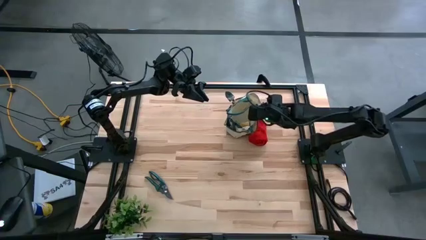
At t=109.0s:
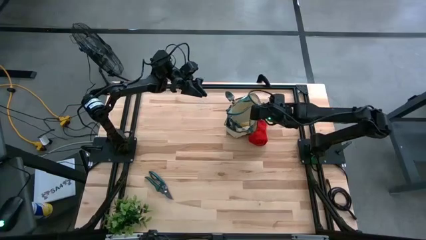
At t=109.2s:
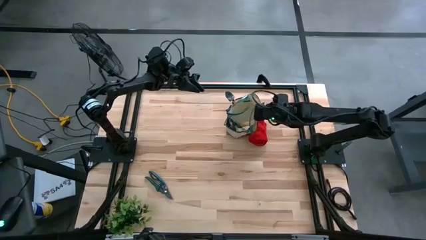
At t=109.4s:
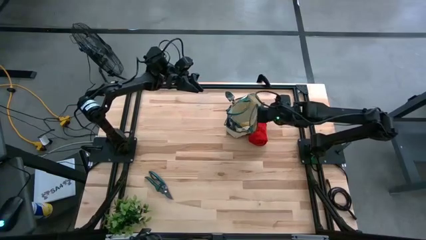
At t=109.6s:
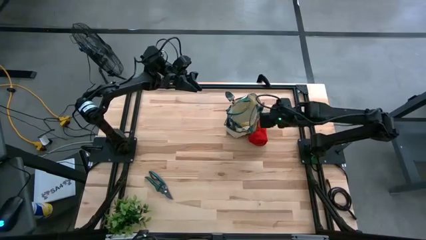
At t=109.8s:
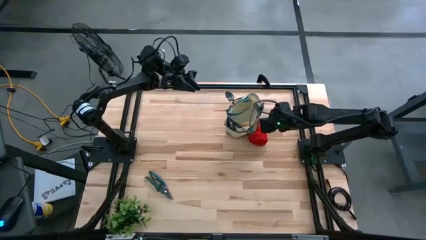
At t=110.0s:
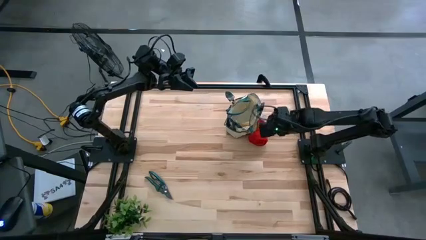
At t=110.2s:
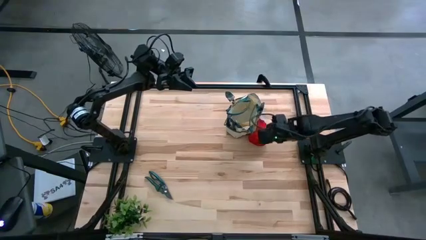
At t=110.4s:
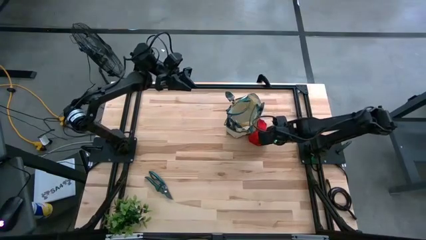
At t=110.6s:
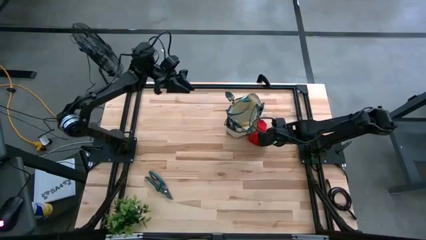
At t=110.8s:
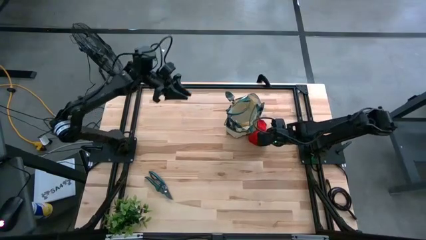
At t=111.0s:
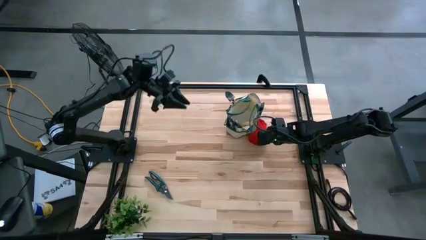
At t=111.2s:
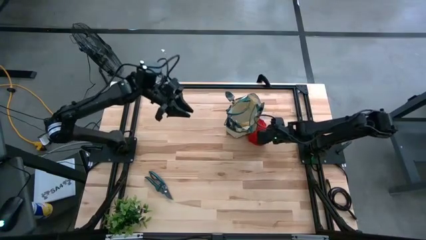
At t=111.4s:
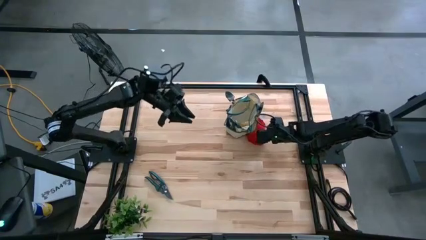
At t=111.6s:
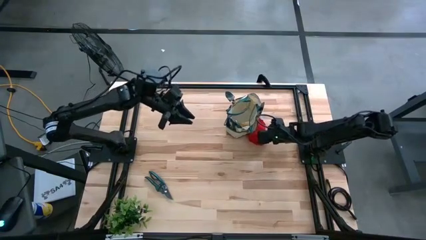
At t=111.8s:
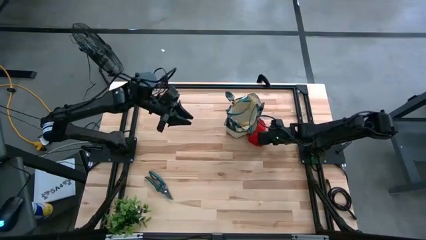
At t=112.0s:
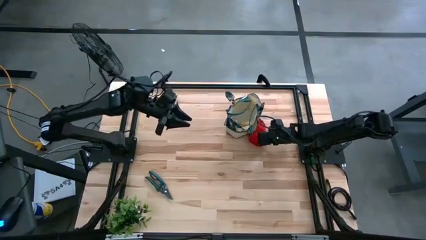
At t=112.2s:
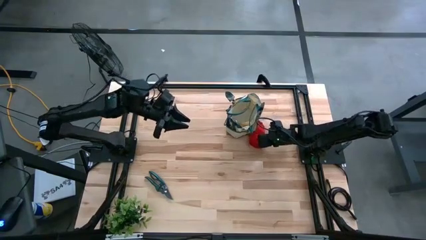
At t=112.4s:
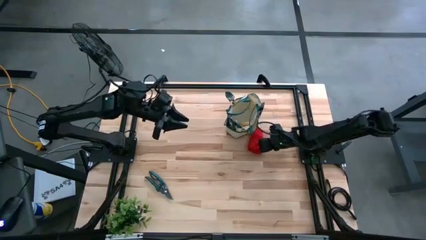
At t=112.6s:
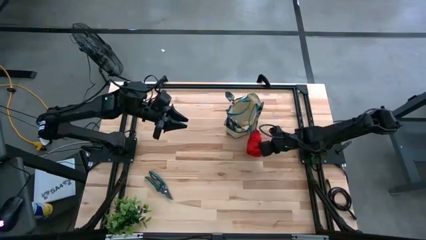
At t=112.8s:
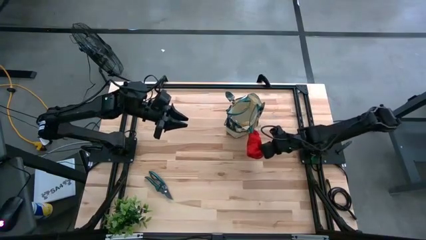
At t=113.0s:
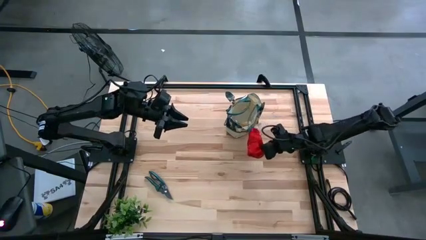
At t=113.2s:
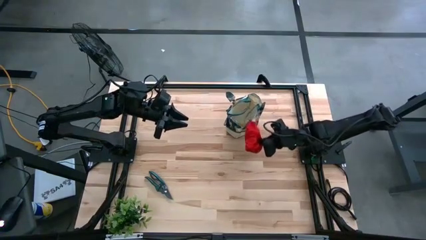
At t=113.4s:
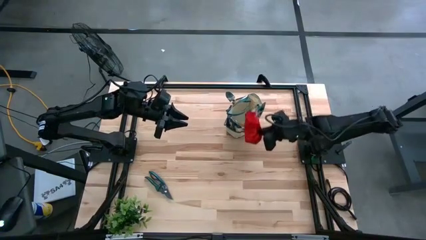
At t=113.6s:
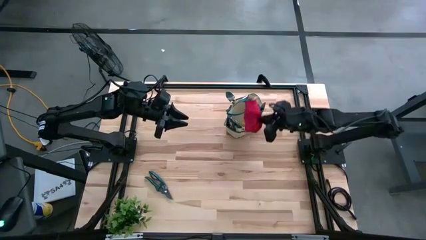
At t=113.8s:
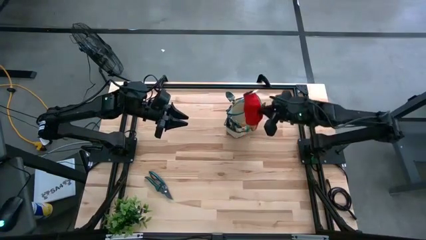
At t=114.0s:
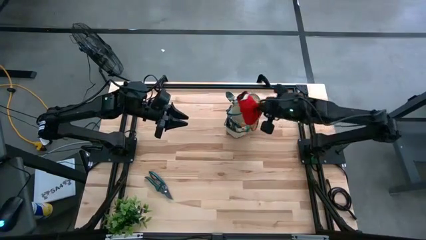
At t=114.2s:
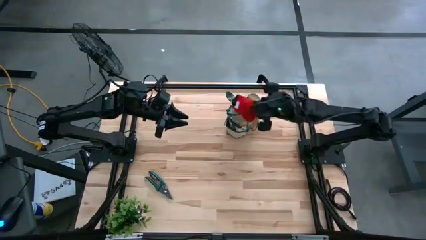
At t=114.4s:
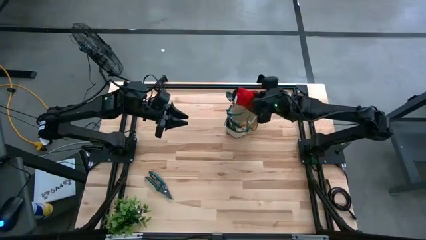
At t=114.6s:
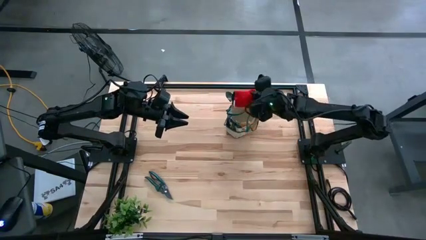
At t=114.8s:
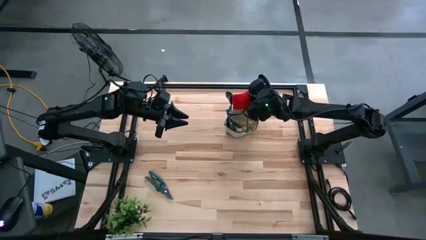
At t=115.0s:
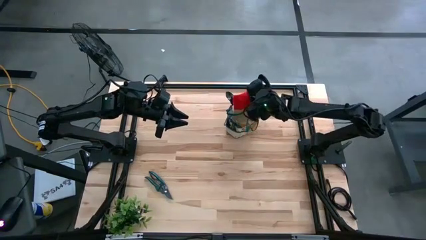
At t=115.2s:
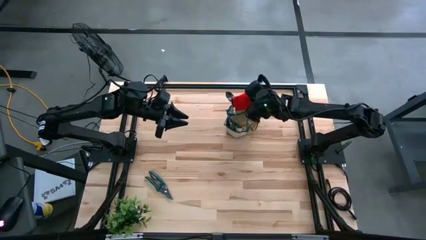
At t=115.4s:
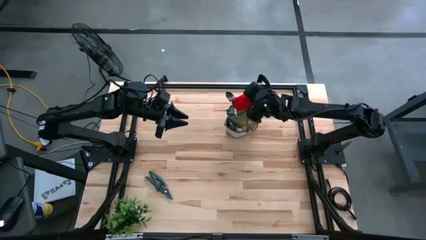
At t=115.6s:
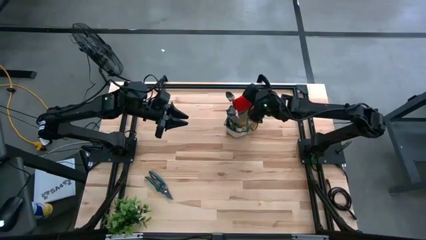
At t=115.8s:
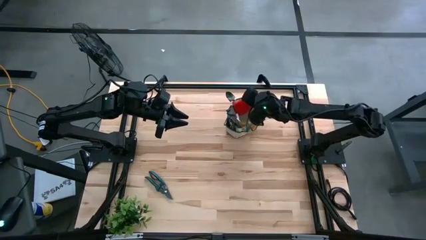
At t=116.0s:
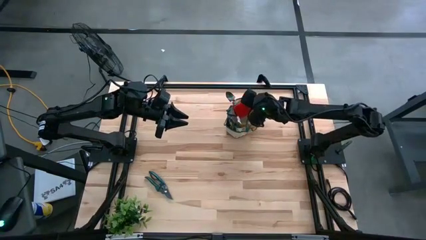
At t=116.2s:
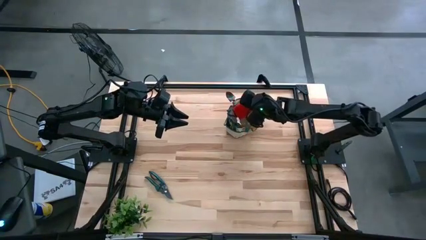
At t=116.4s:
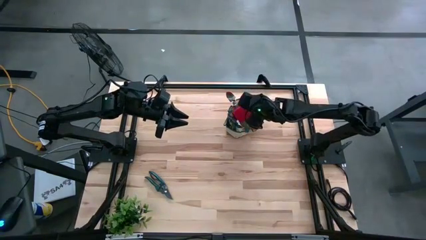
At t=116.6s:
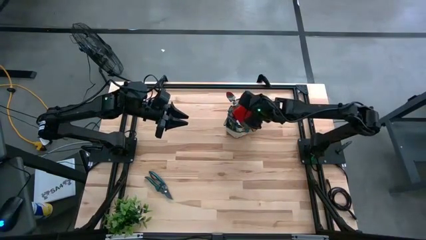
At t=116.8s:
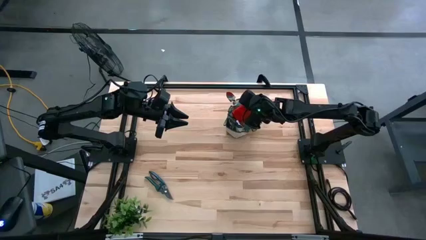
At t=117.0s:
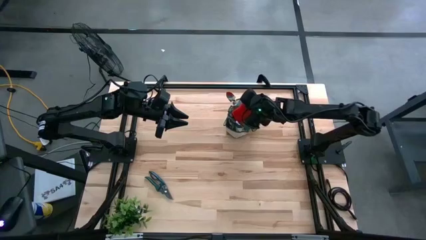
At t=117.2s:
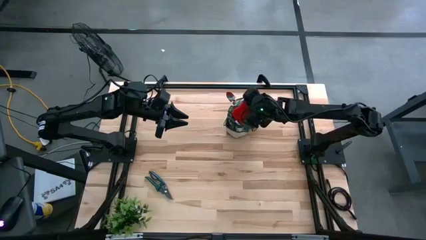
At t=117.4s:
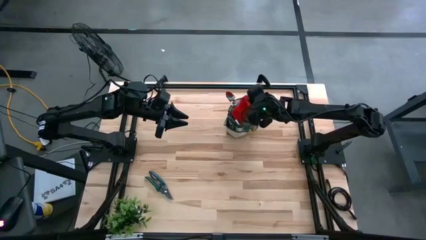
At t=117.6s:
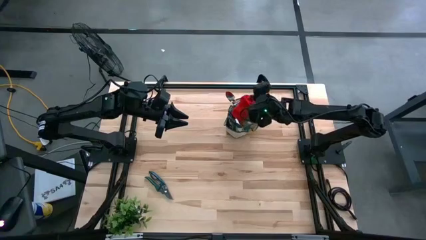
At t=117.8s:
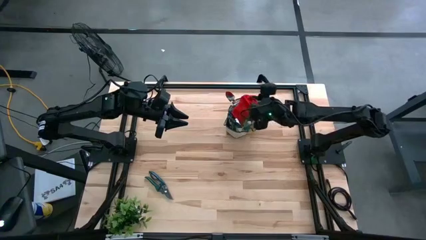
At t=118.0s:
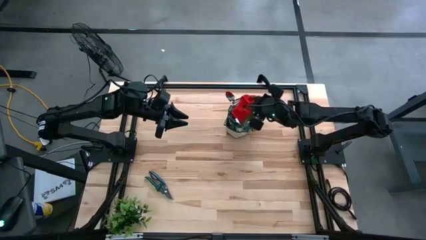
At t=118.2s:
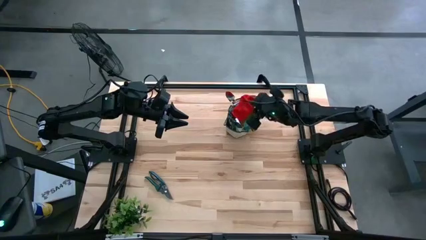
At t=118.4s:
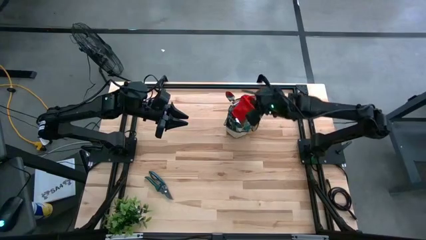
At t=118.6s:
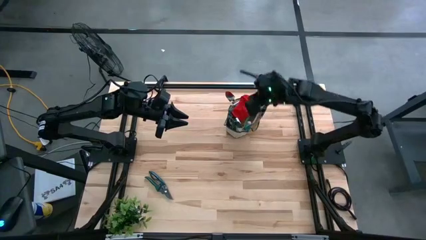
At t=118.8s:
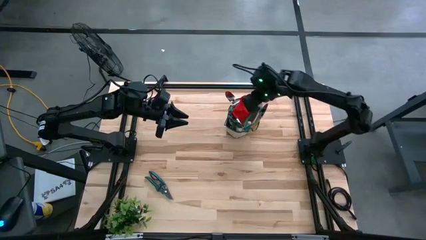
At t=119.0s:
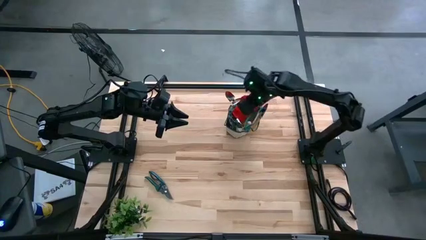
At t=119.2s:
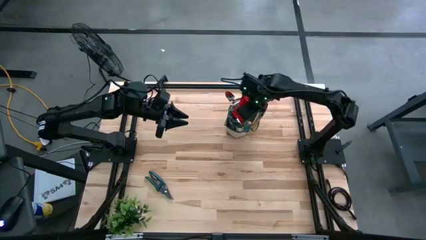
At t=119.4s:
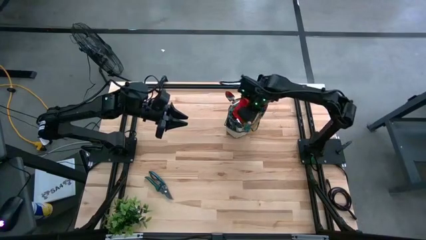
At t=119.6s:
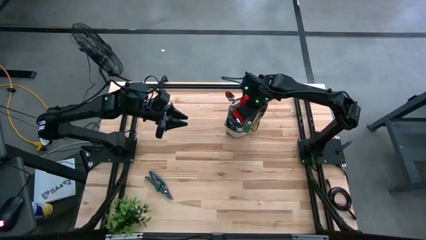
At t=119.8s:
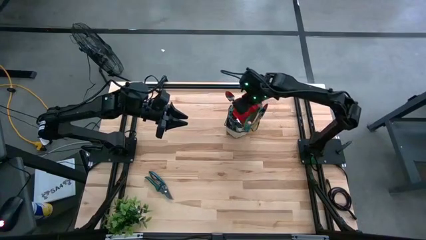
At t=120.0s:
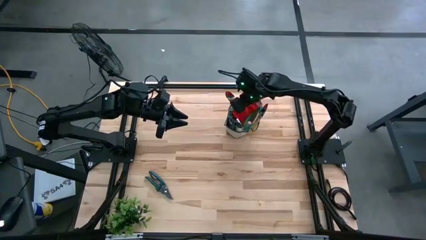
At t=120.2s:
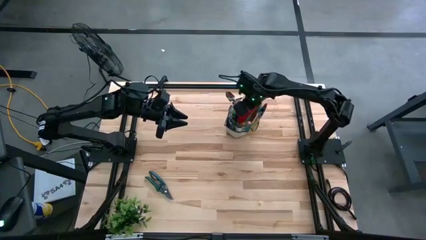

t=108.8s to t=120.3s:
Task: Pick & Place Garden tools in Gardening bag
Put the red gloves into the gardening bag

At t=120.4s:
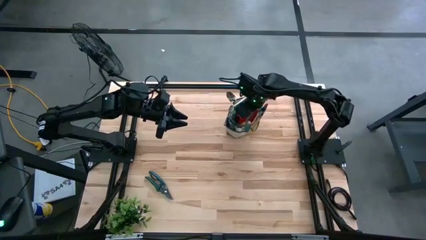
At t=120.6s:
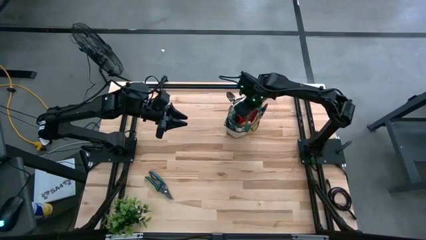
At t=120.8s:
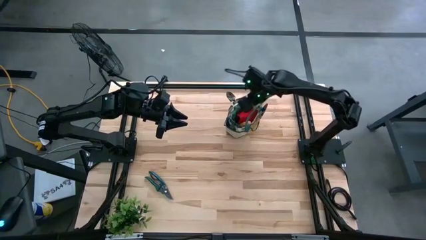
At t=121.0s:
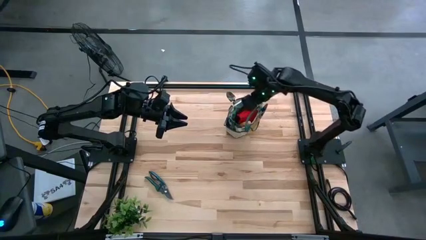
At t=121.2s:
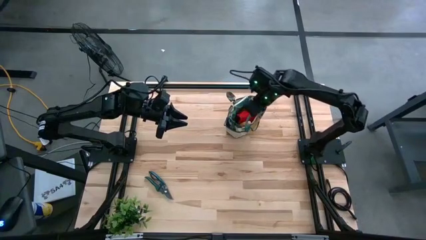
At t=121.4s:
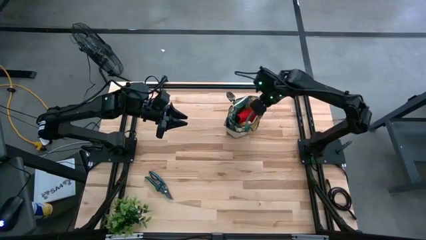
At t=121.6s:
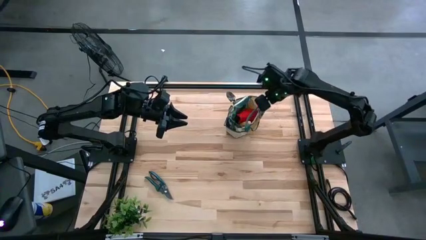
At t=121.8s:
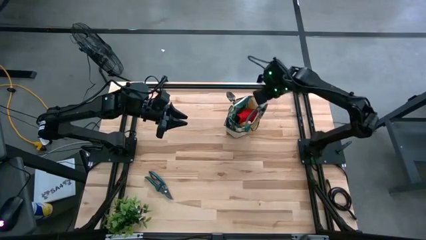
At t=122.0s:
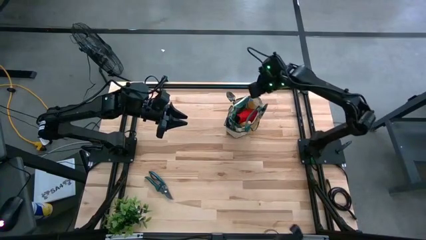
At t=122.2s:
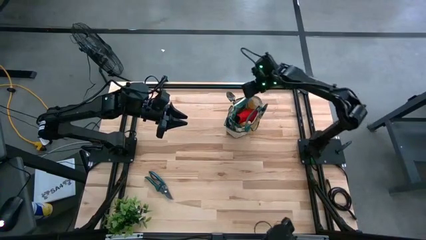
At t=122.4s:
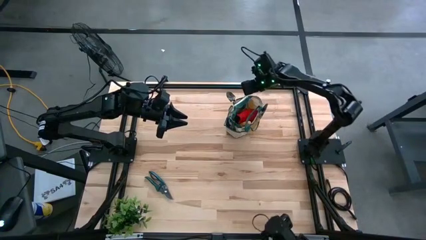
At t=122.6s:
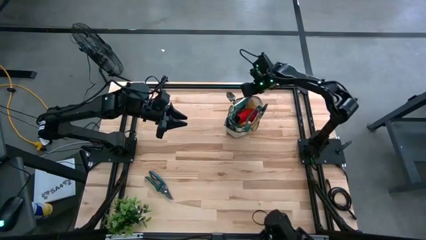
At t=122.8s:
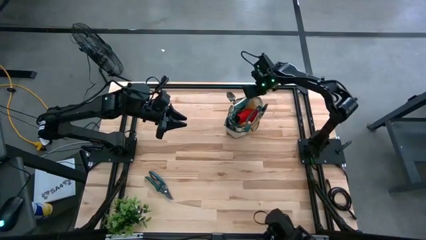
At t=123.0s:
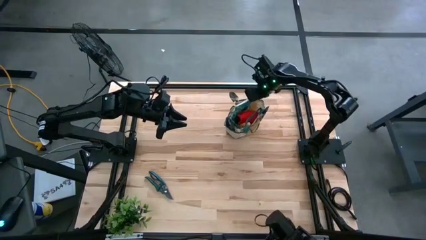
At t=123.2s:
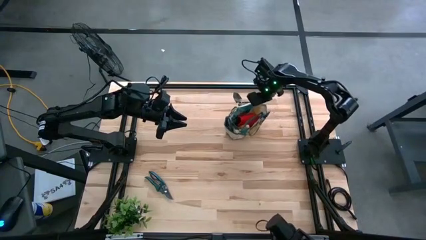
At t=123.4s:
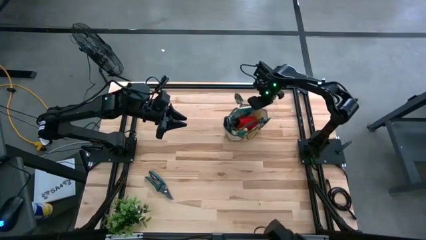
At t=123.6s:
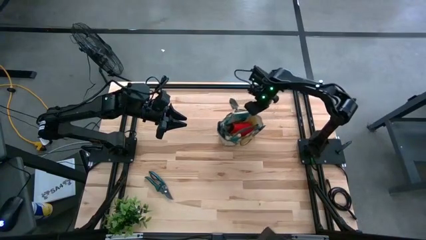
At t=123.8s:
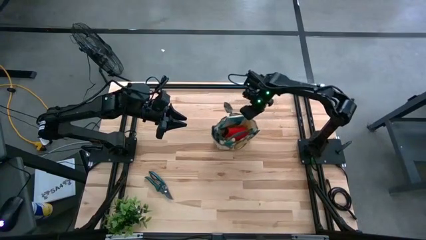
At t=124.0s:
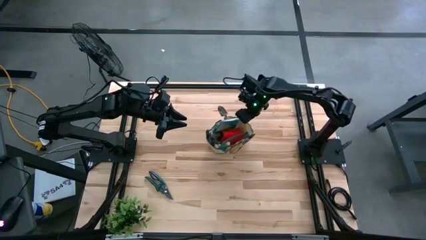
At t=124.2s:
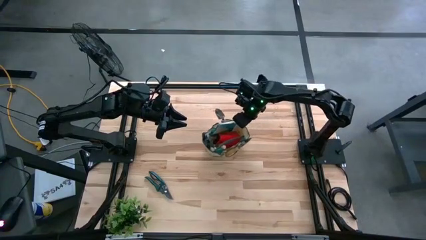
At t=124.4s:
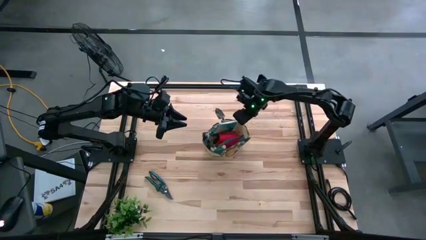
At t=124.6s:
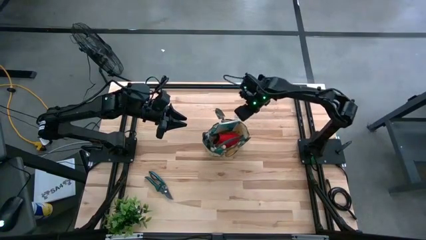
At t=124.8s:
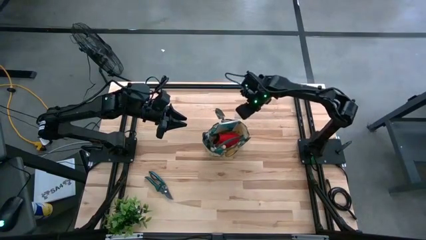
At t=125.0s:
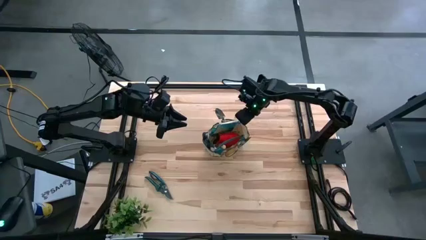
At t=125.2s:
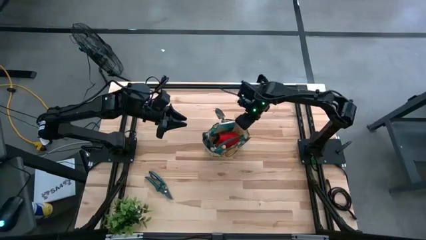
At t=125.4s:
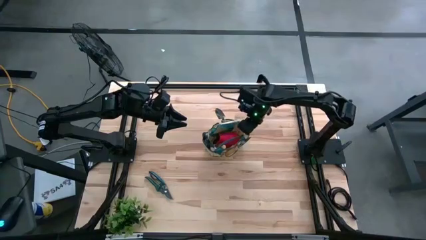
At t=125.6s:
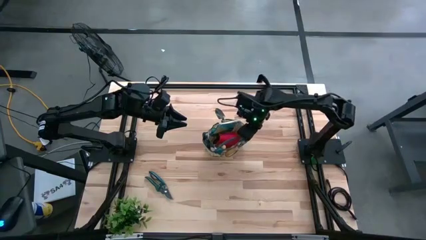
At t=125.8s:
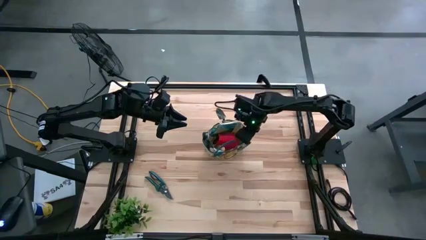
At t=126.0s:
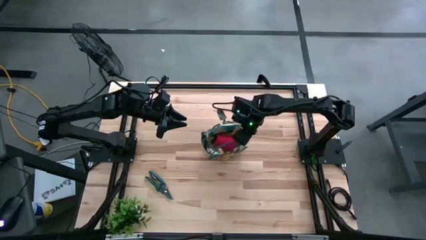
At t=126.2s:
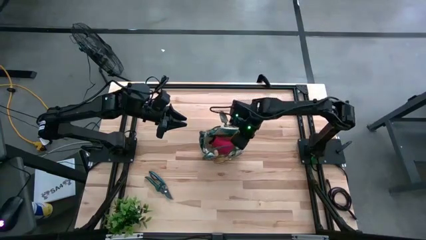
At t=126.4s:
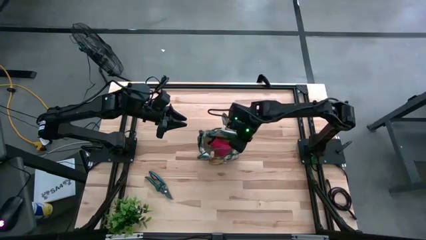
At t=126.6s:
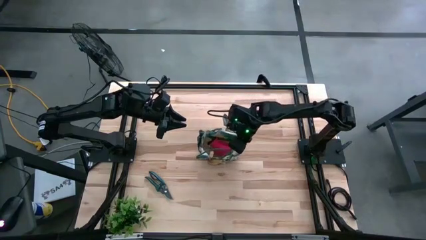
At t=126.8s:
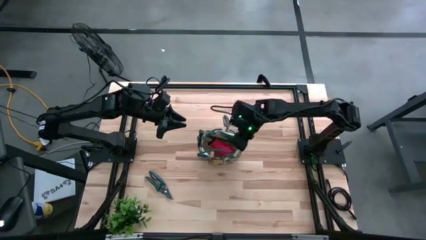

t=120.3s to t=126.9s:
Move the brown gardening bag to the center of the table
